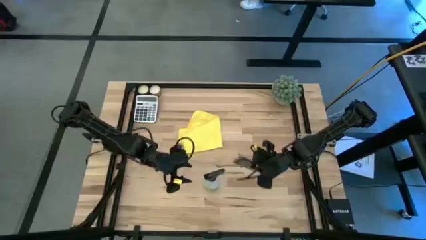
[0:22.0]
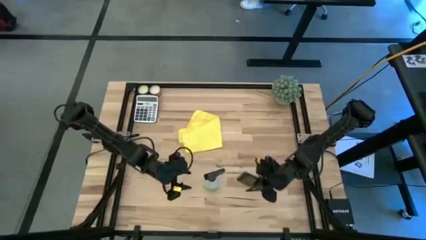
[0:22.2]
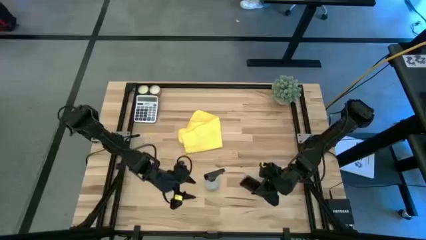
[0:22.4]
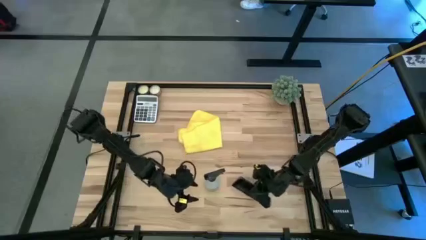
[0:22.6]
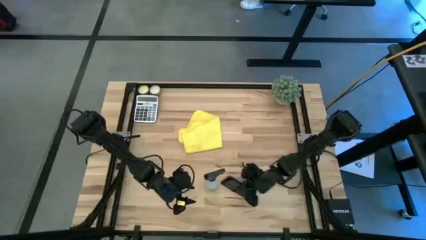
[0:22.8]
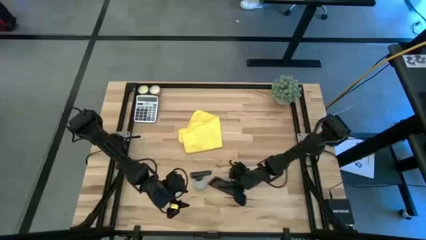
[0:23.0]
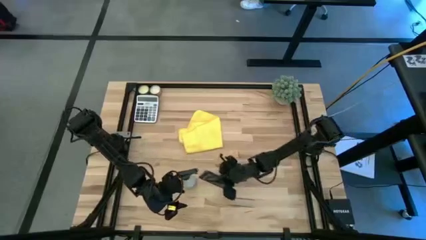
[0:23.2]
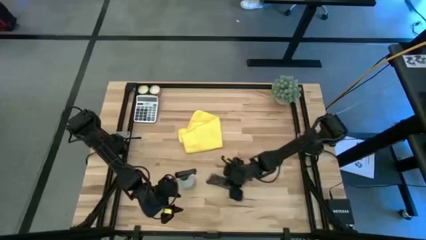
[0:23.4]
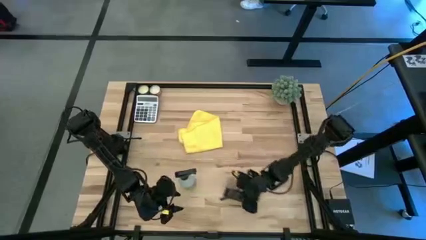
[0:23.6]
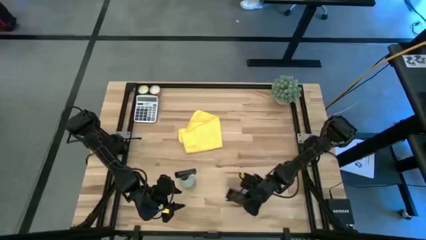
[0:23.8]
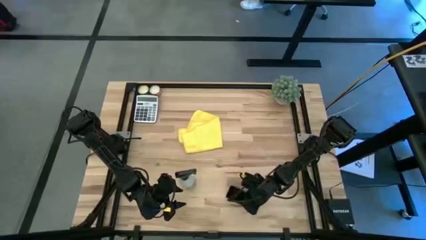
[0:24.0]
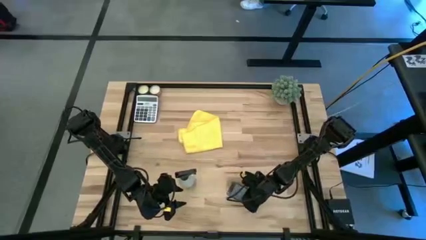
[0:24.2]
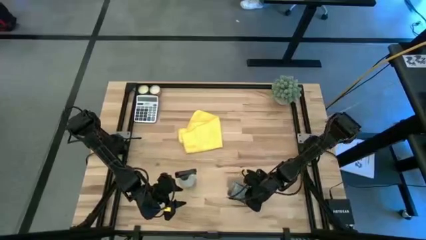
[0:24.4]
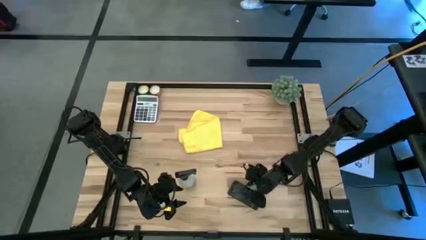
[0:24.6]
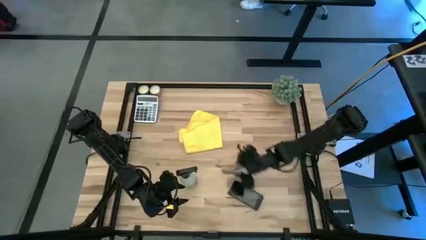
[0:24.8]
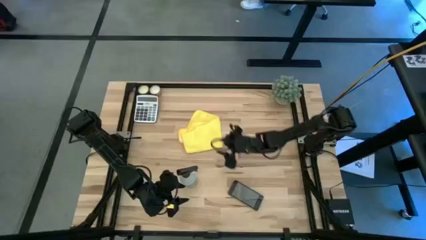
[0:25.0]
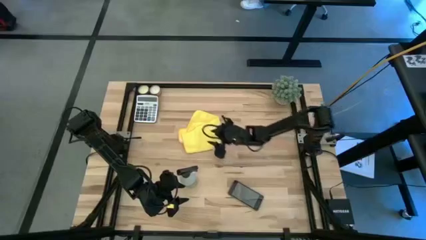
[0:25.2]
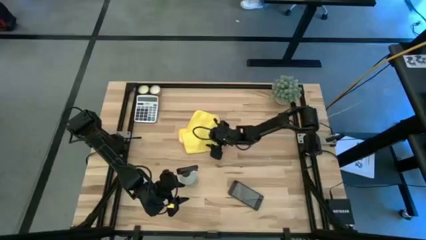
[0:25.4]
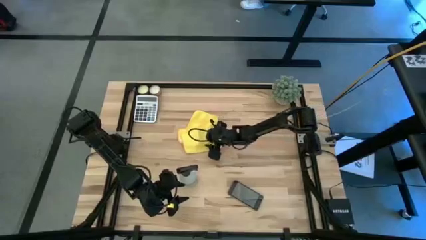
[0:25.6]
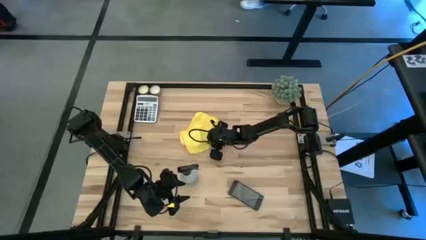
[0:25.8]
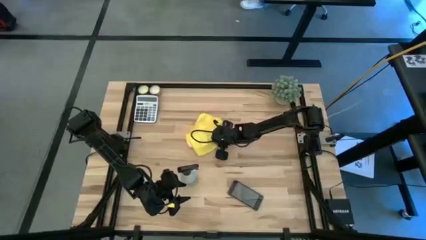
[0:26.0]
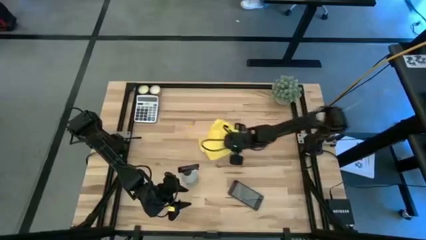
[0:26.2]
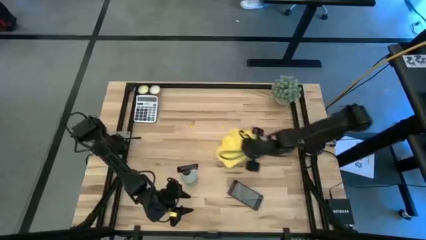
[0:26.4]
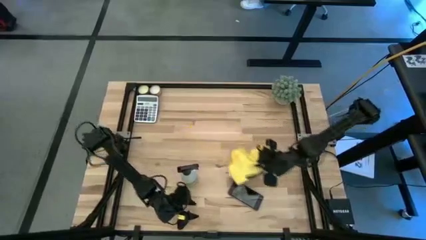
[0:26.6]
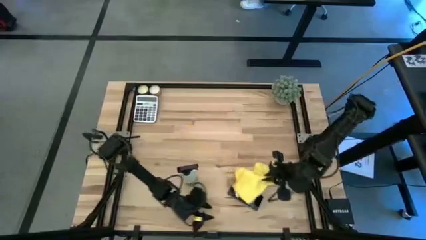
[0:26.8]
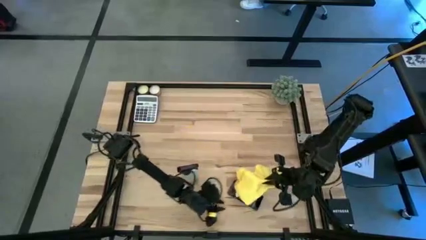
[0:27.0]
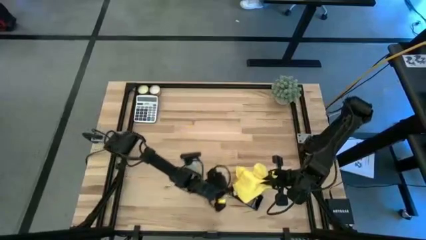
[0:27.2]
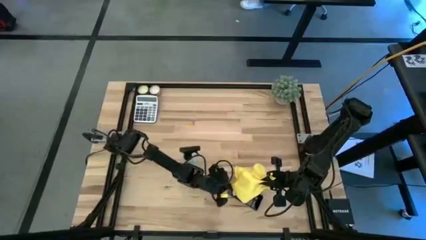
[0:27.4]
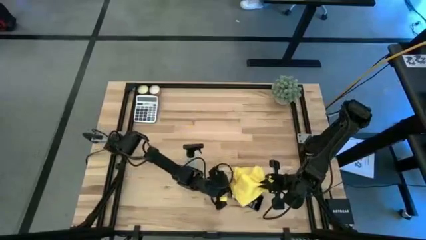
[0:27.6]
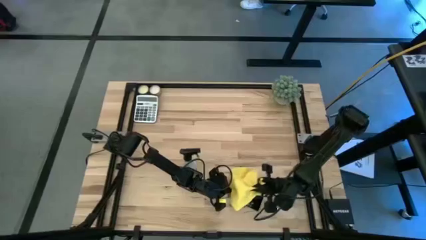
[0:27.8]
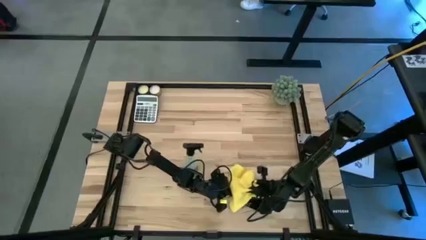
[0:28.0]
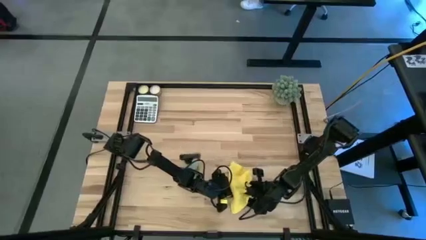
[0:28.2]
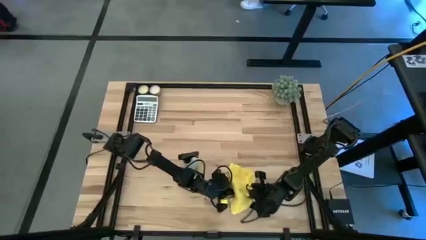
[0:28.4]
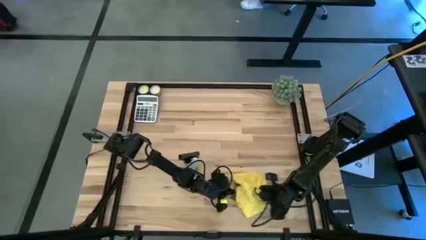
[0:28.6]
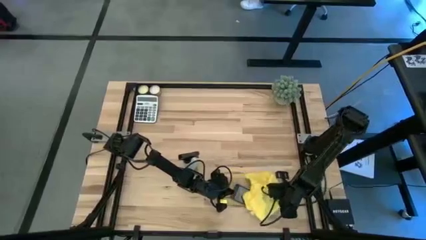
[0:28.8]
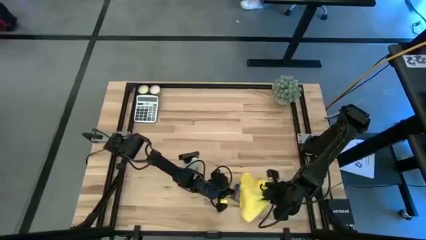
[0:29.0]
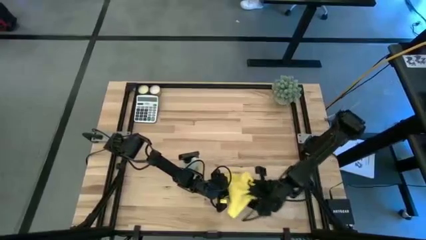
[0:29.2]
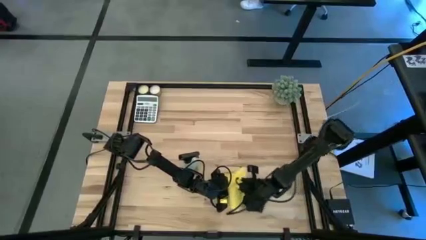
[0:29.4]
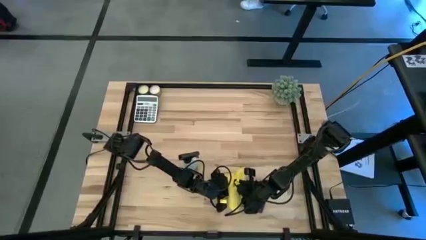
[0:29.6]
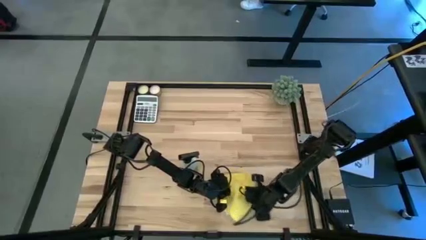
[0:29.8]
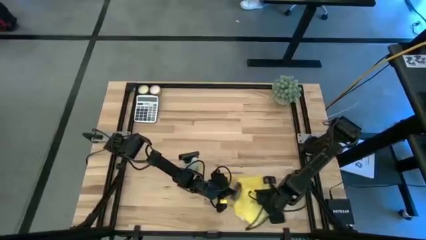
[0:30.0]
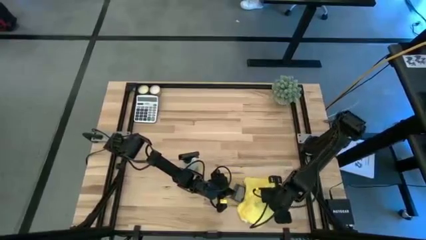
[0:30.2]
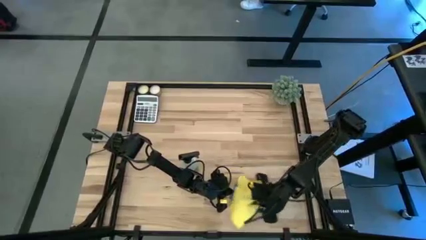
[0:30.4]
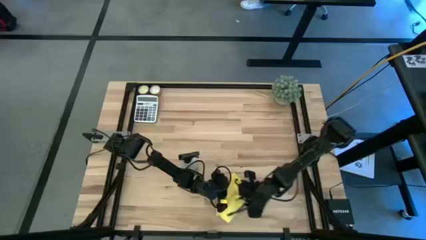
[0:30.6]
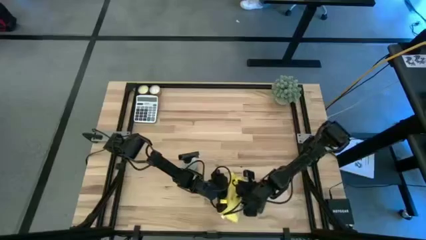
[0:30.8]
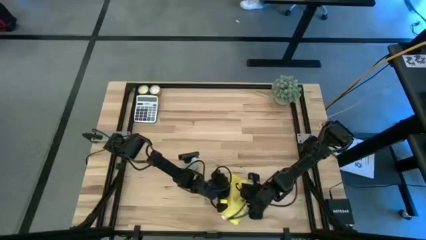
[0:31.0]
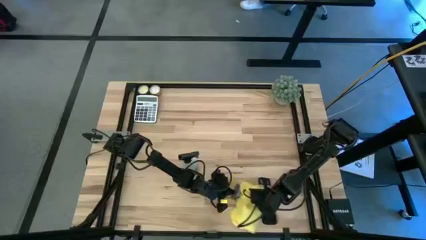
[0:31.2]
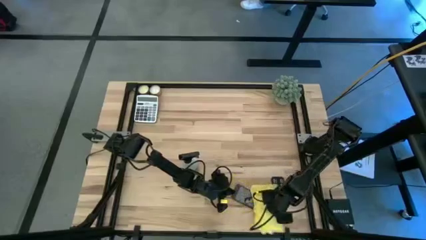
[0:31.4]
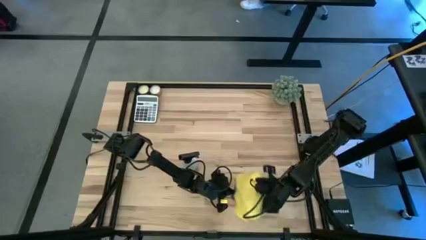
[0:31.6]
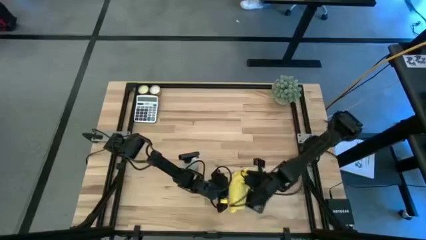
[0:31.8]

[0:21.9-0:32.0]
Task: Apply microfiber cloth
Wipe the front screen of the black cellphone using a yellow microfiber cloth

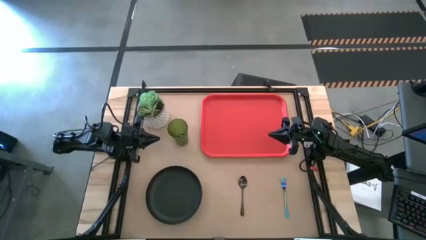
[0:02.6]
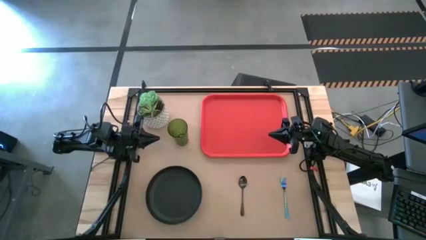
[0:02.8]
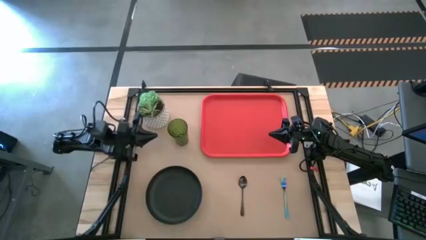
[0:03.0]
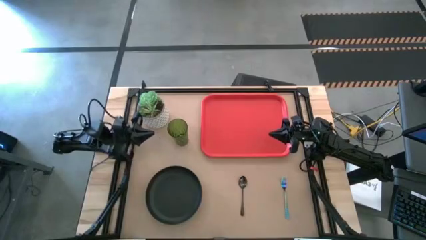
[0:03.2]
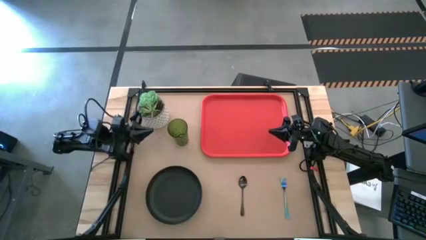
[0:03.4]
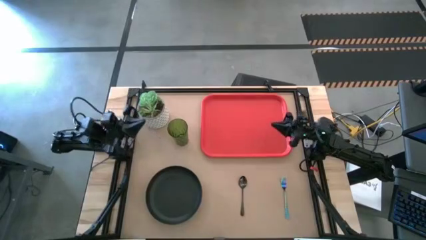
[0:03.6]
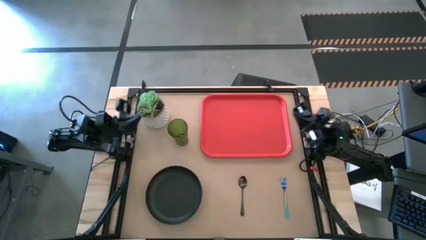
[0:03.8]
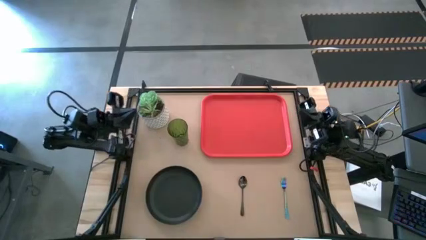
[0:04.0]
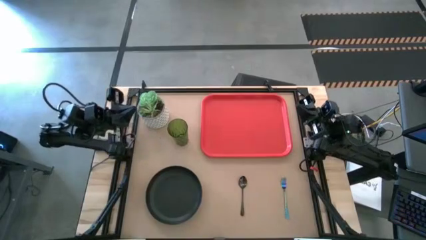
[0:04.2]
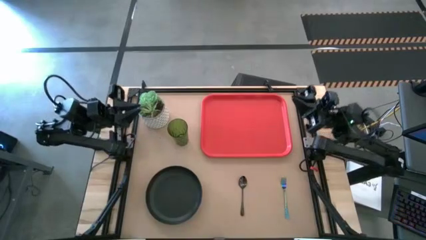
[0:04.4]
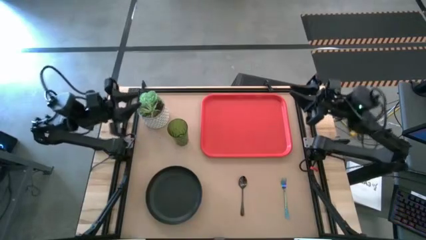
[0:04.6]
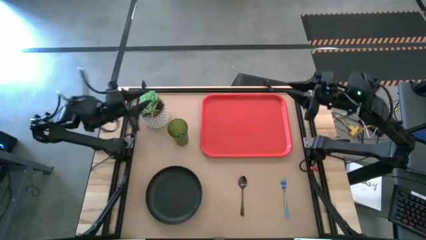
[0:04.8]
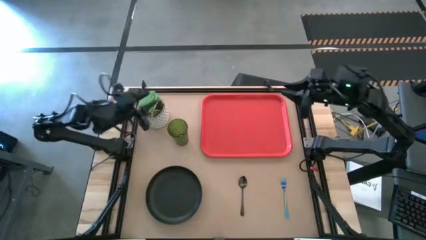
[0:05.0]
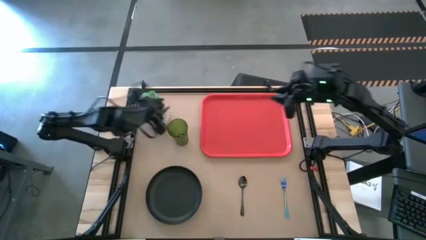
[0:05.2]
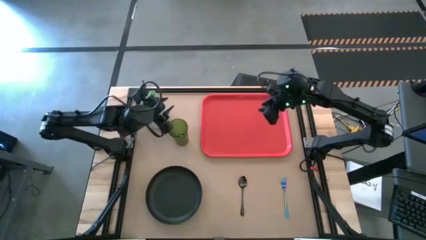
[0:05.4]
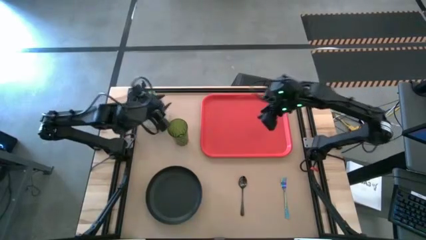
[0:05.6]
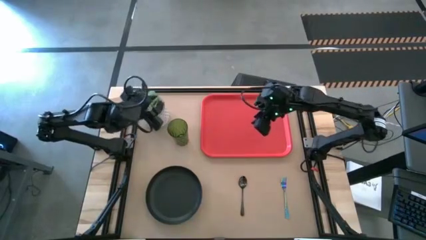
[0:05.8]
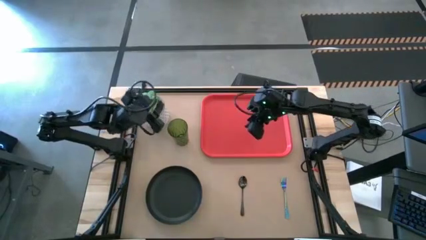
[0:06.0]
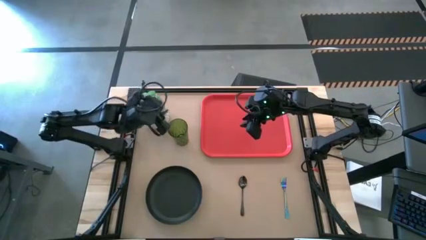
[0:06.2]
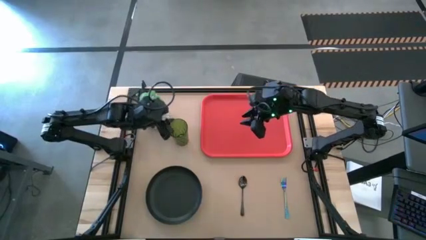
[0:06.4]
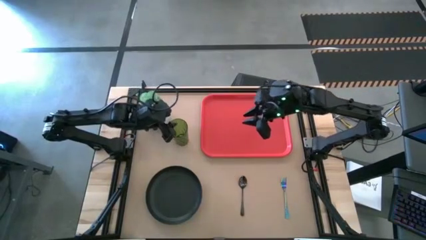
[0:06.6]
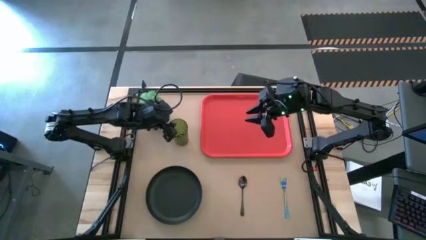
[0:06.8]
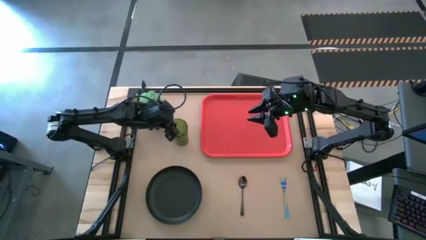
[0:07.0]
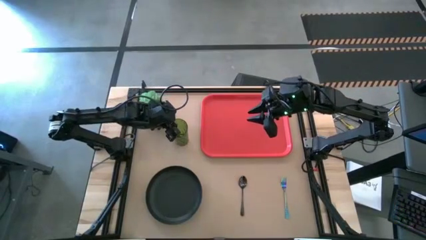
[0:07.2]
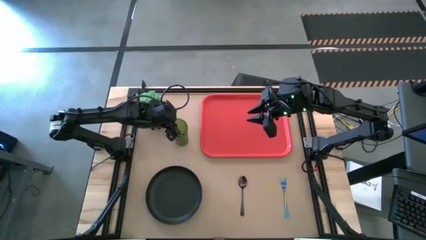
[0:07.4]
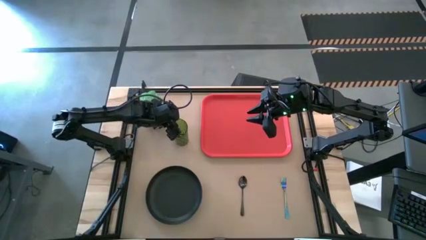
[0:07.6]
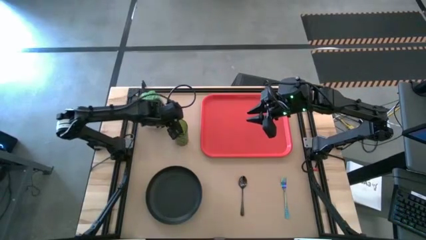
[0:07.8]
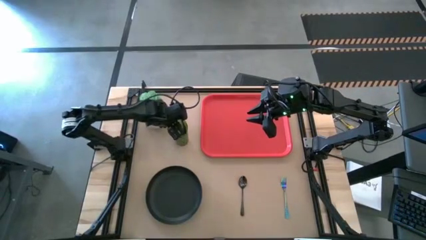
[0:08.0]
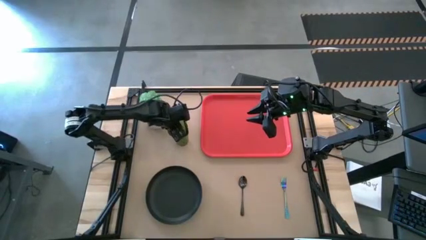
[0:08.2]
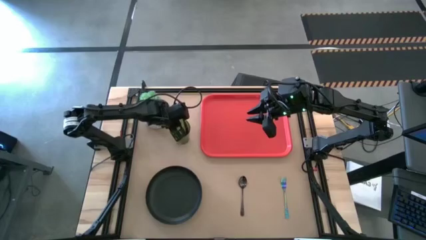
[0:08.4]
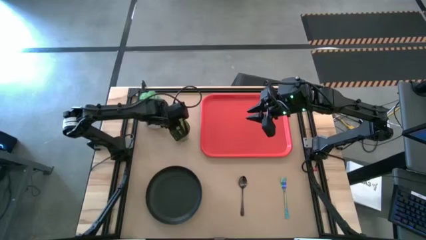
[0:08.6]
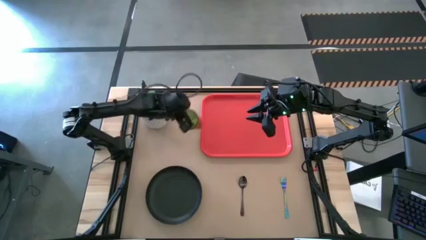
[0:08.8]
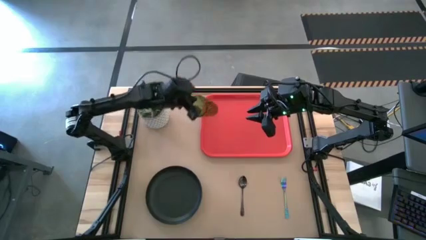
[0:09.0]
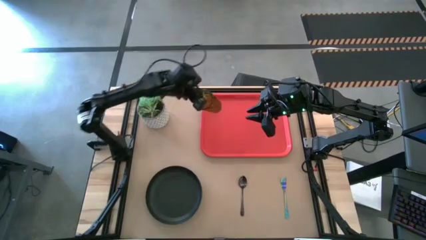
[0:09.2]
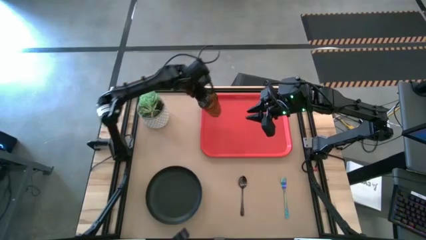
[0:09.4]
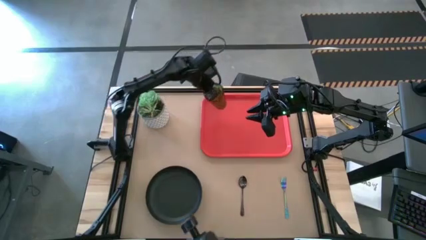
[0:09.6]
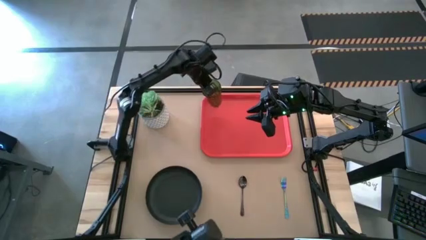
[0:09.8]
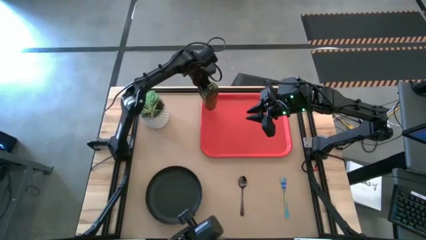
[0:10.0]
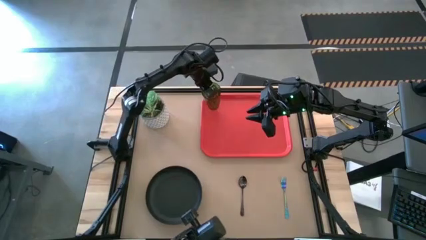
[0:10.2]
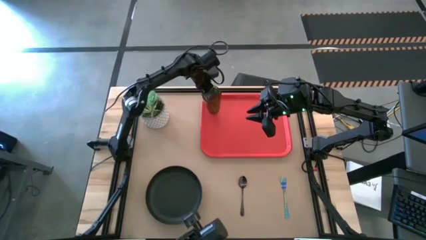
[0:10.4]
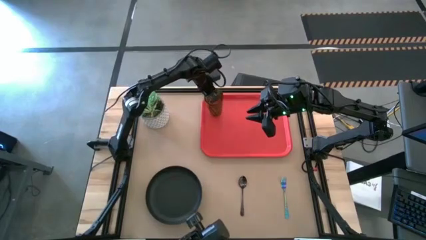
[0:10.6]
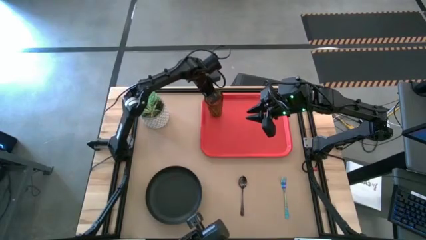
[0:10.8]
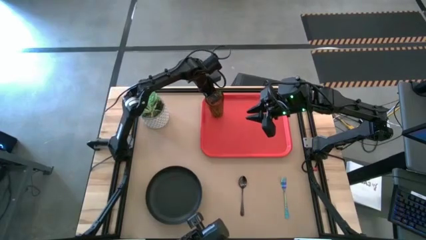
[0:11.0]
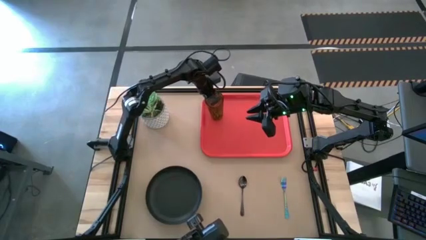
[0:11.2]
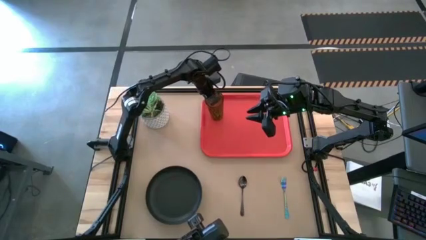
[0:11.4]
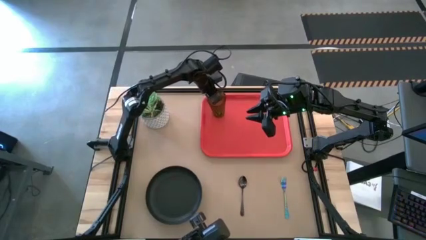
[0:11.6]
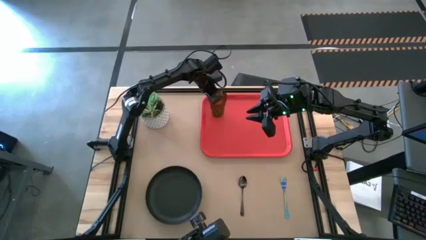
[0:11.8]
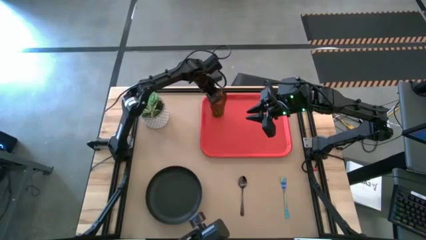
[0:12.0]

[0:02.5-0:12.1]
Task: Pick and place plate/cup/fork/spoon on tray
Put the green cup on the top left of the red tray
